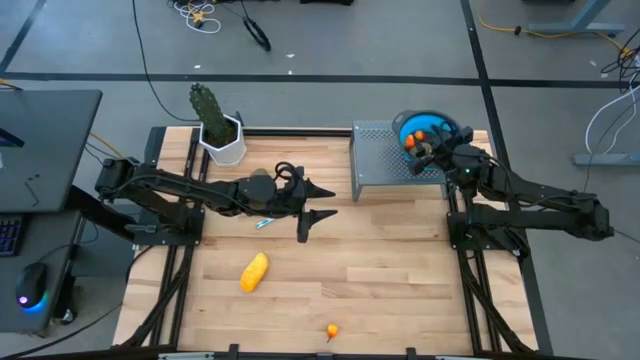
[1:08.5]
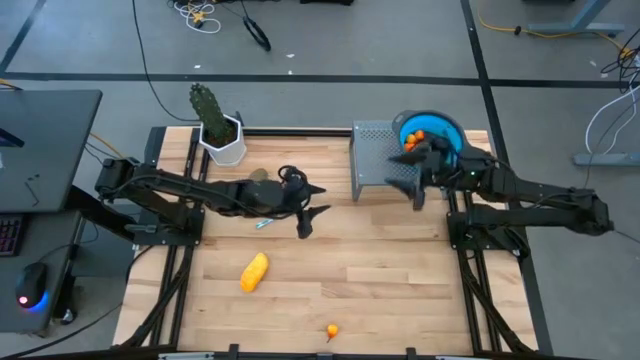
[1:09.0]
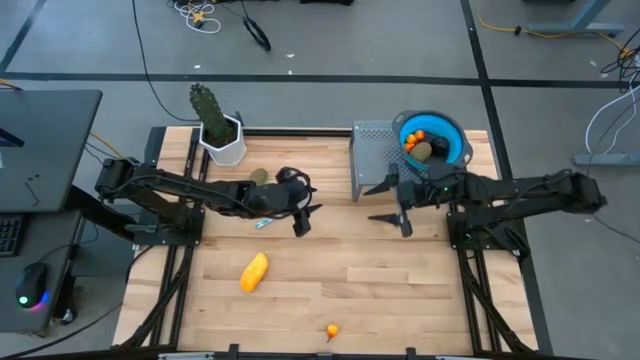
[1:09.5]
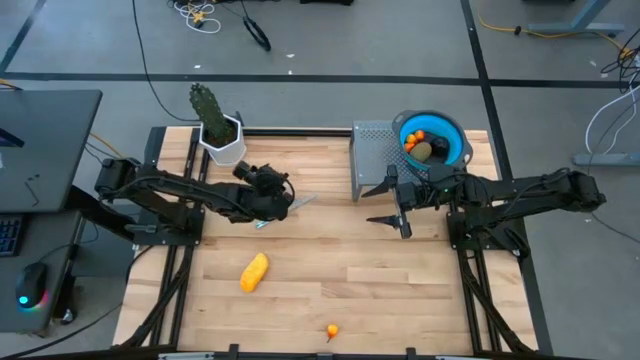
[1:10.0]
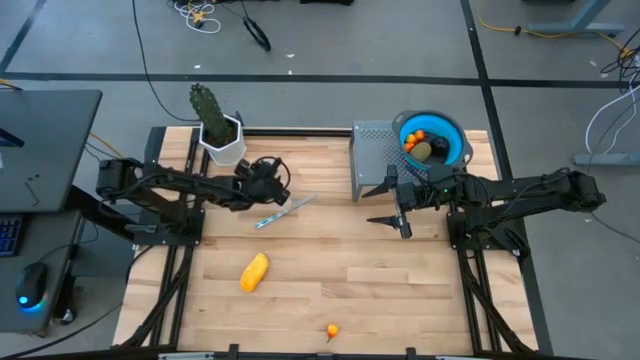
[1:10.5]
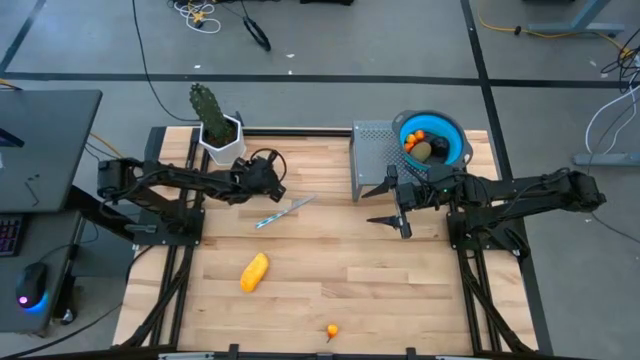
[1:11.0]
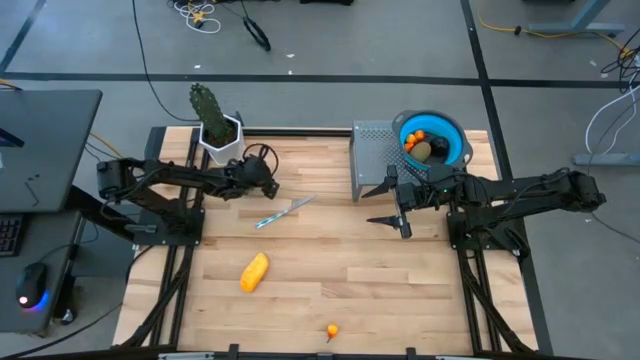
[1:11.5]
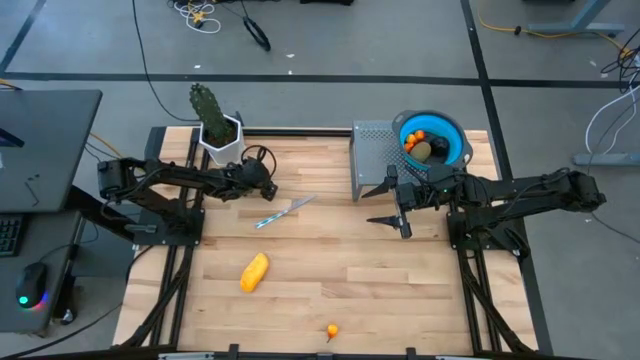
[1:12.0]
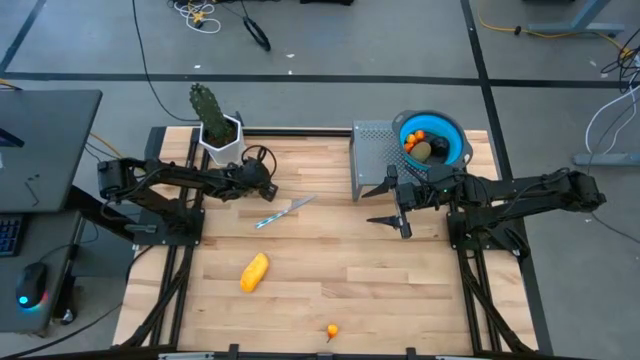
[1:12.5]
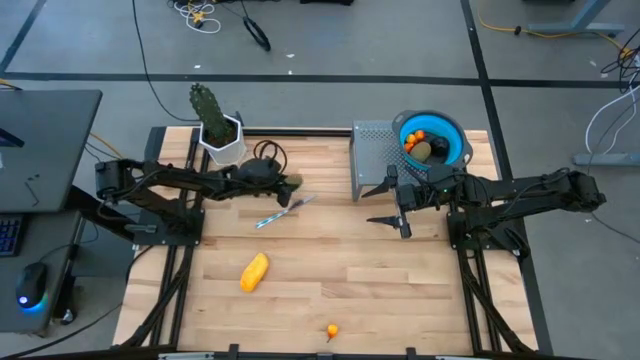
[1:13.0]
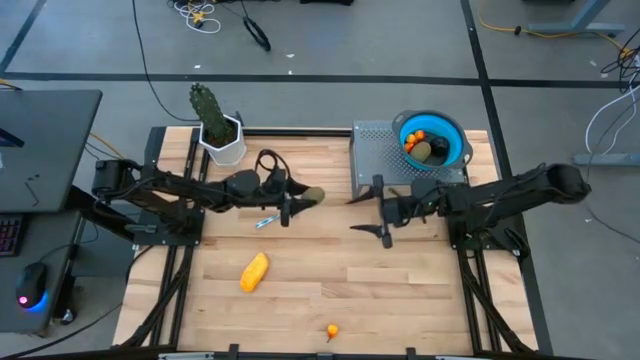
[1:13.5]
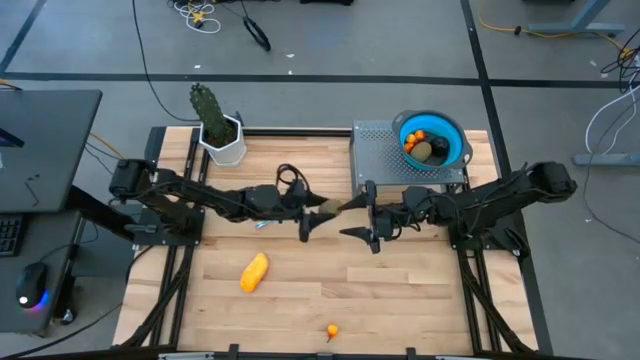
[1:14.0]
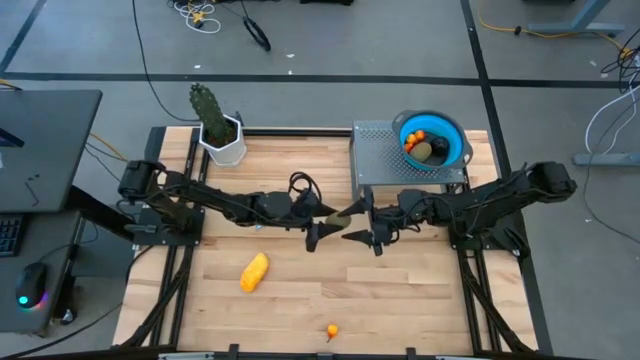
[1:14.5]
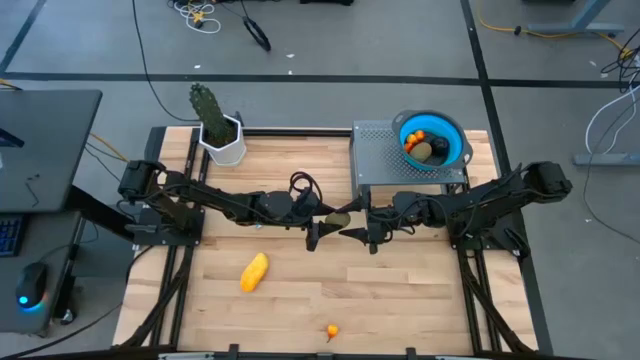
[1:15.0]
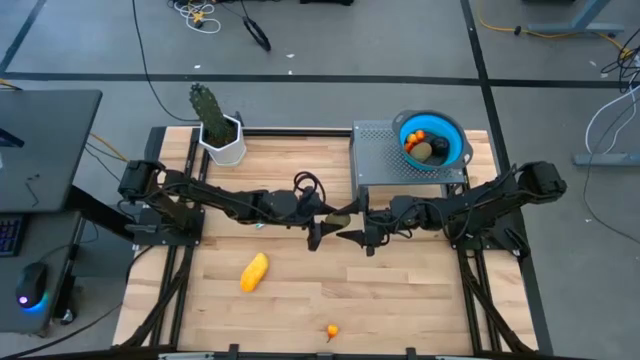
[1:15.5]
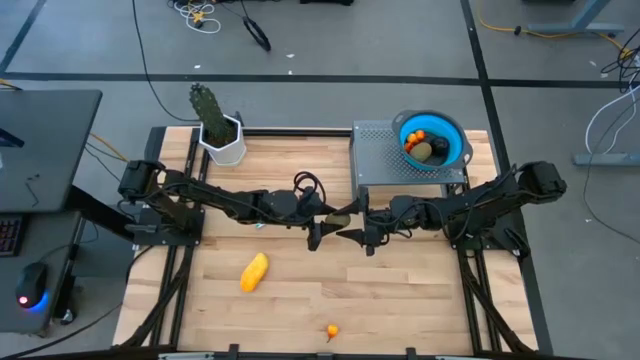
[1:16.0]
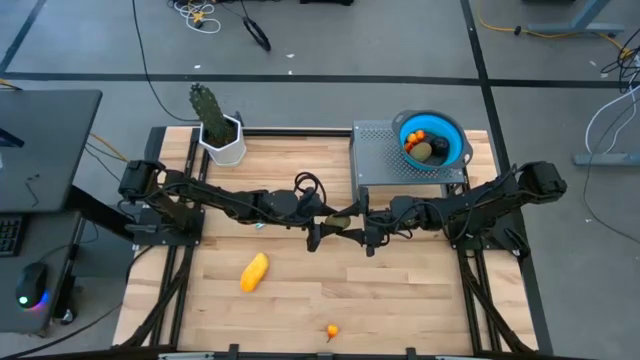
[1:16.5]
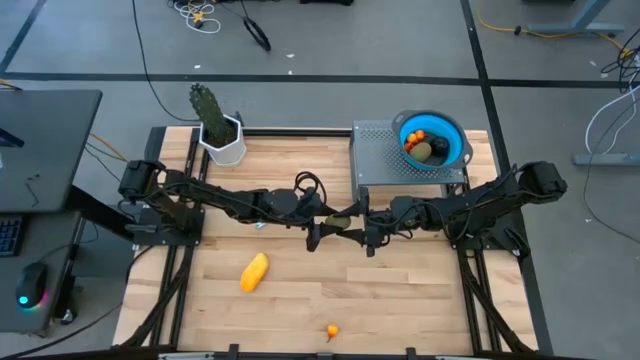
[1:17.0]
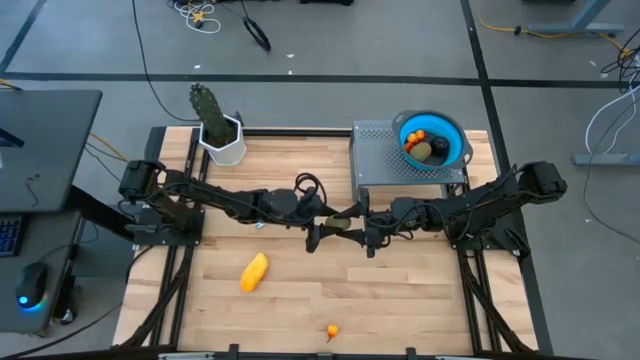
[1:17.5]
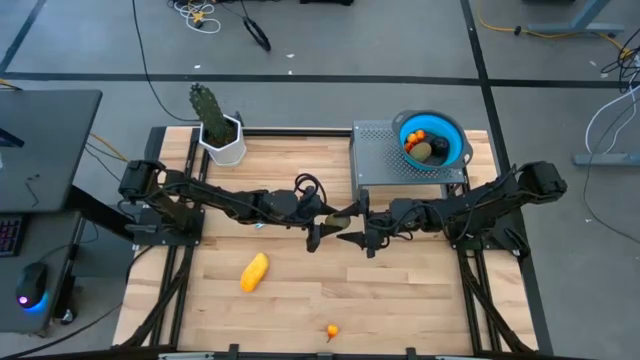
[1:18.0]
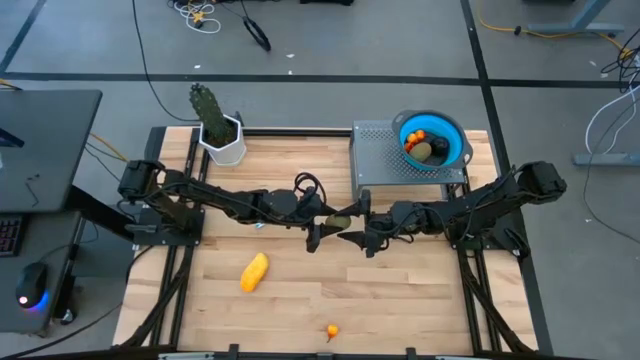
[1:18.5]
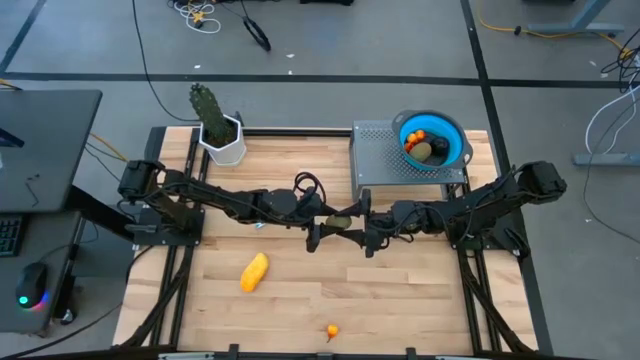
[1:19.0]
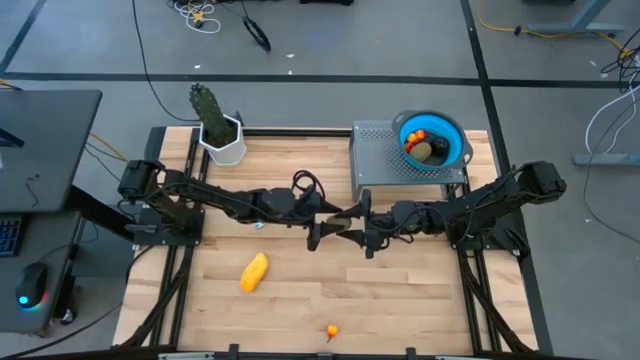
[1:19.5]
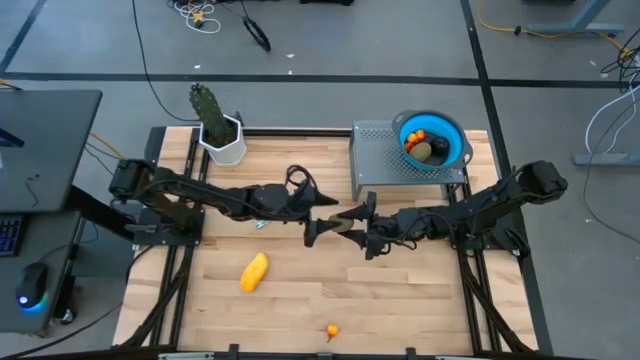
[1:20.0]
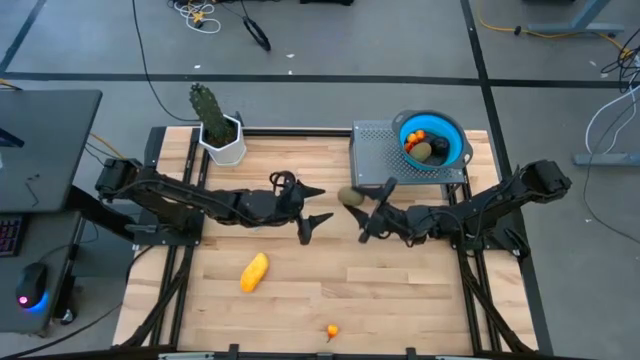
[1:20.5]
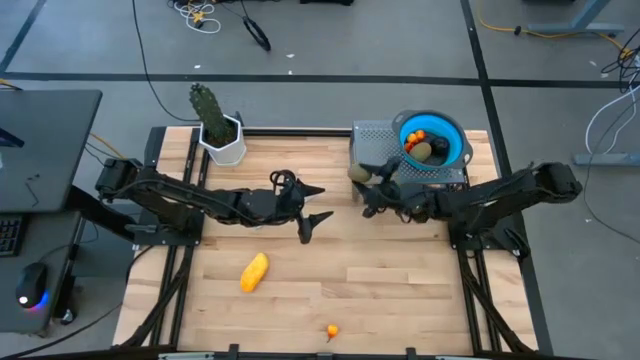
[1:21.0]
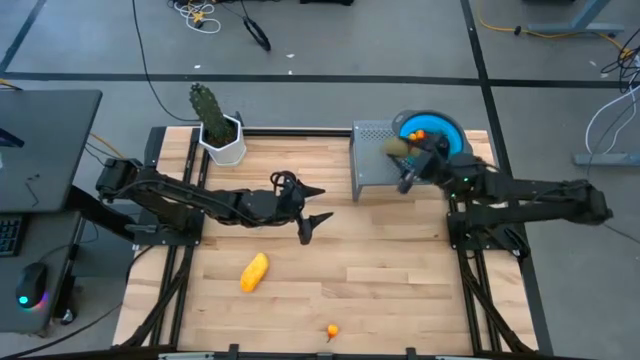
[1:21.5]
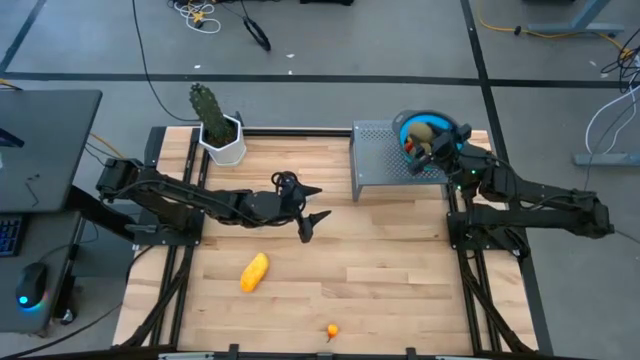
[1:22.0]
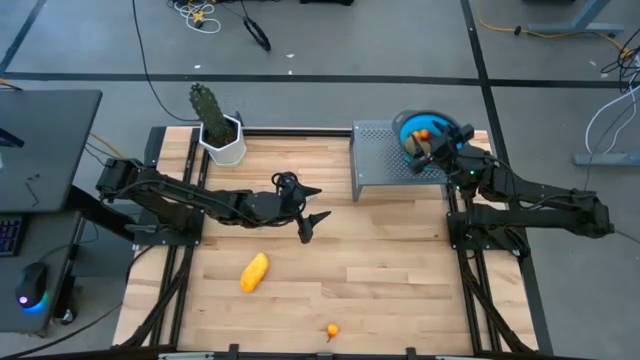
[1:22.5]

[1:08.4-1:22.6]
Task: Pick & Place Fruit
Put the kiwi into the blue strainer bowl on the shelf

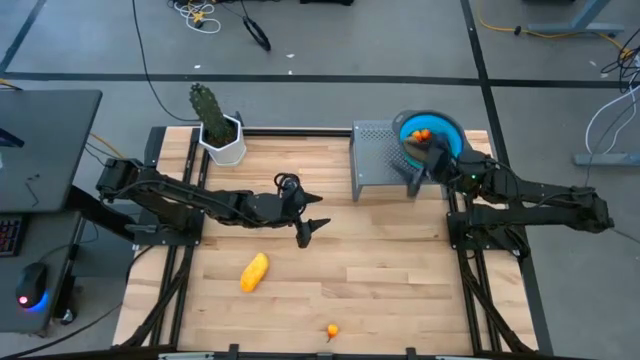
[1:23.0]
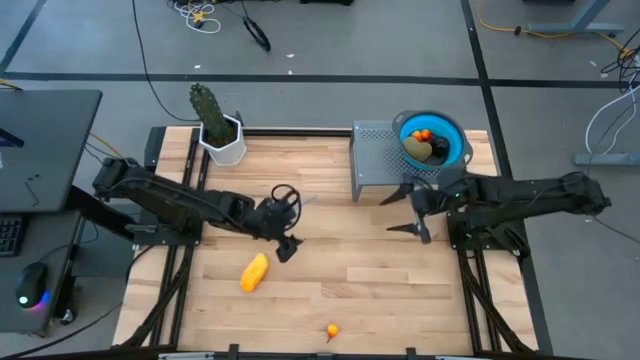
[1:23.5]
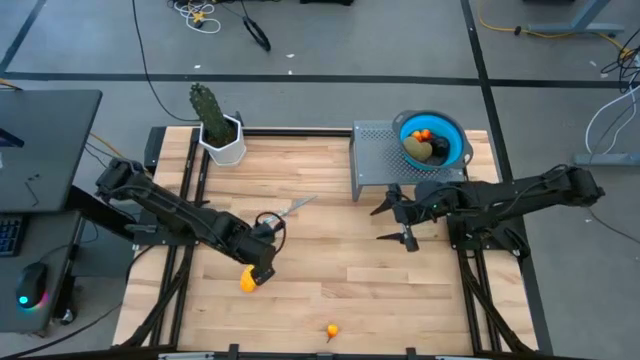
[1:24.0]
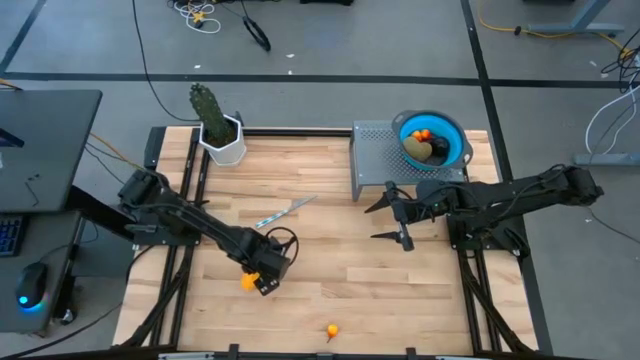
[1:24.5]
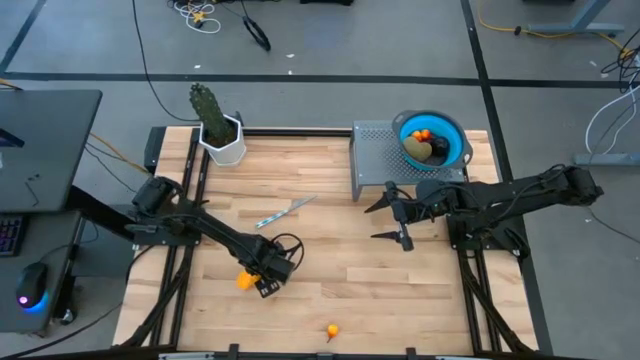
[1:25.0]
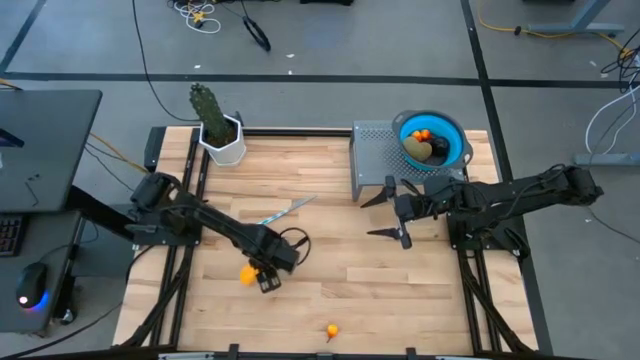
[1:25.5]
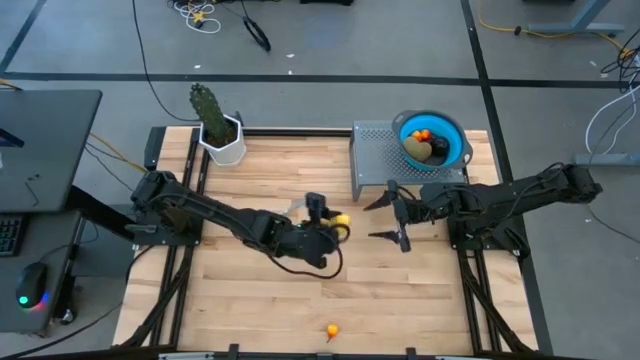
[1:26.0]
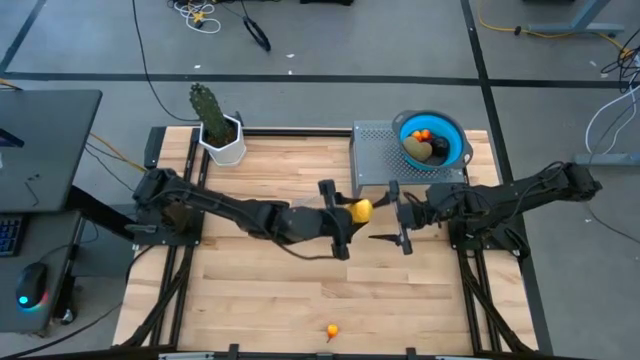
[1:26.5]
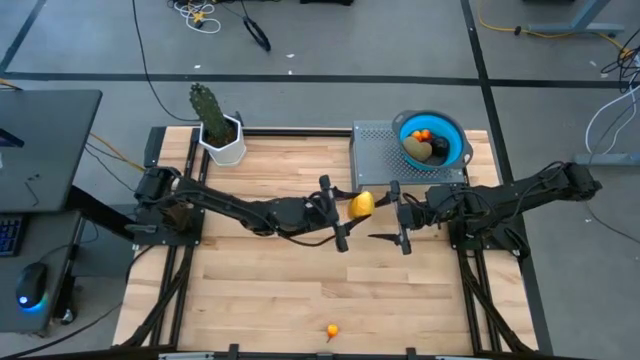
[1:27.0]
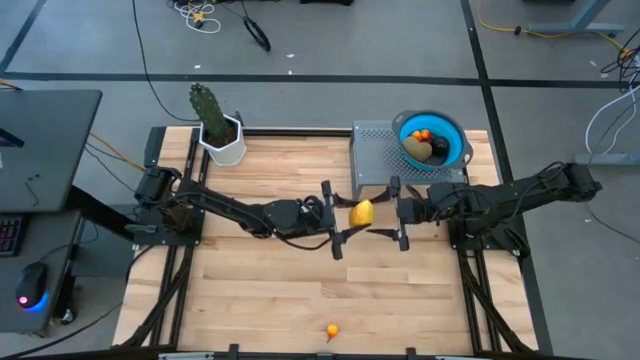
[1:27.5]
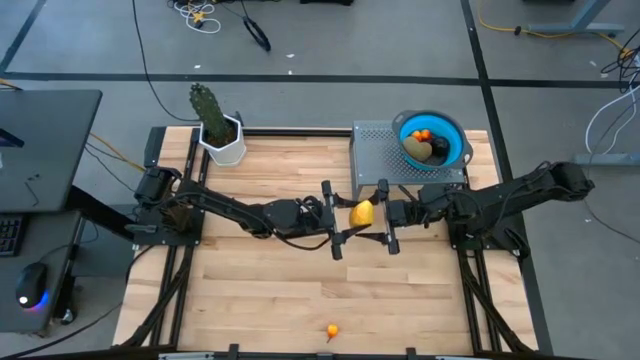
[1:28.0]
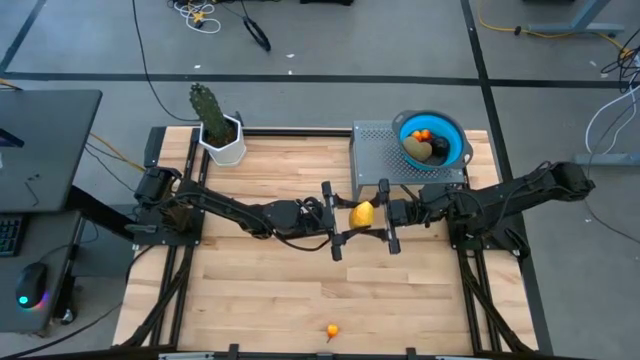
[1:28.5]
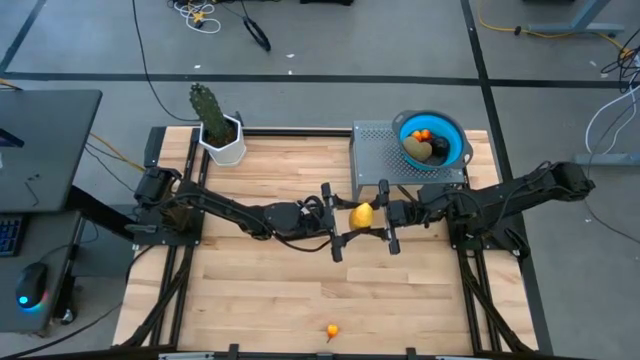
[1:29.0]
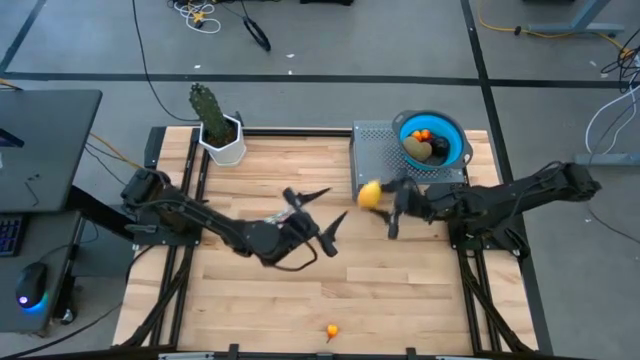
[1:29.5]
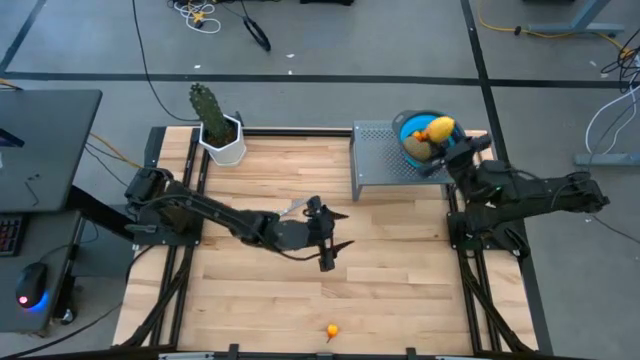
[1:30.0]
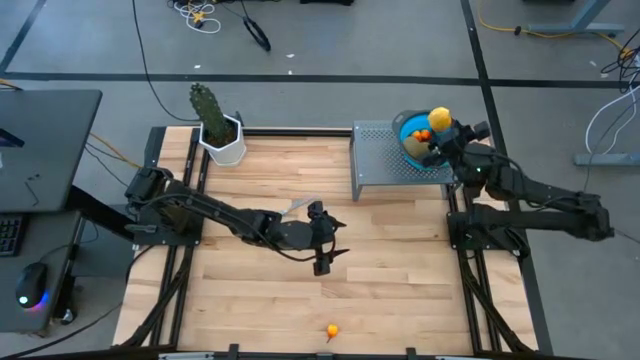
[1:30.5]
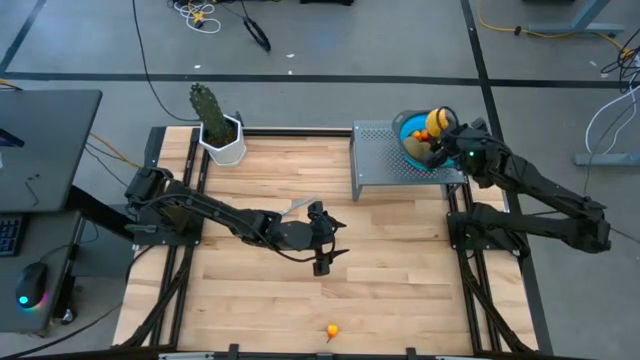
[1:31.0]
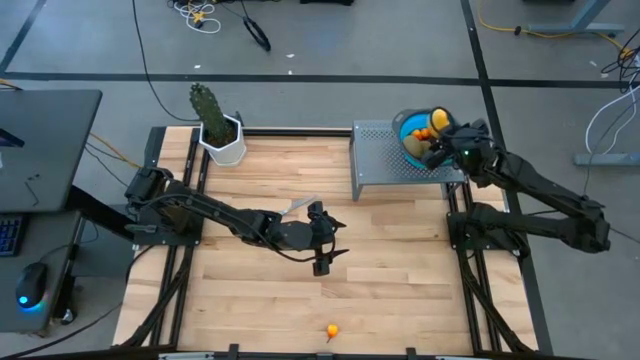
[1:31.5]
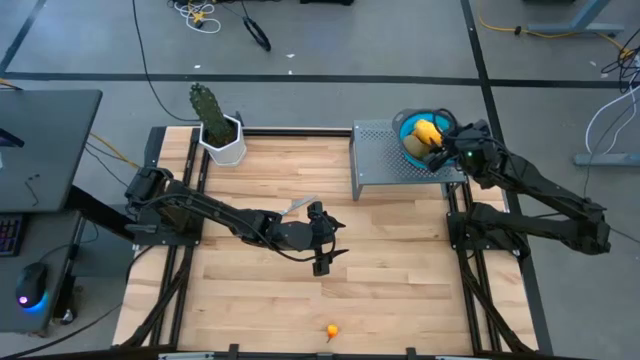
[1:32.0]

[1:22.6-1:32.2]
Put the mango into the blue strainer bowl on the shelf
